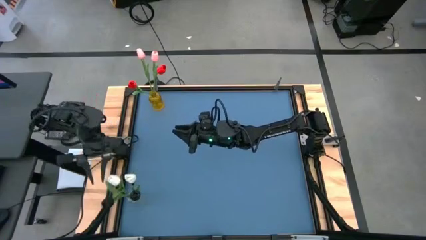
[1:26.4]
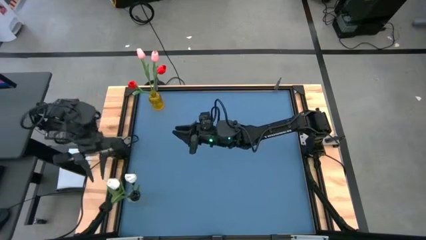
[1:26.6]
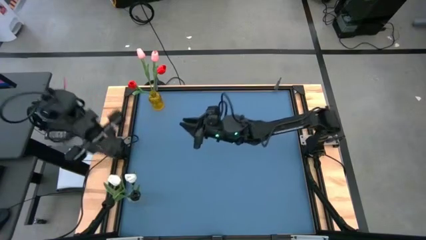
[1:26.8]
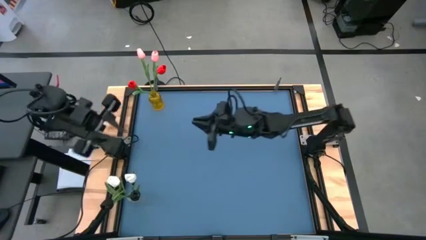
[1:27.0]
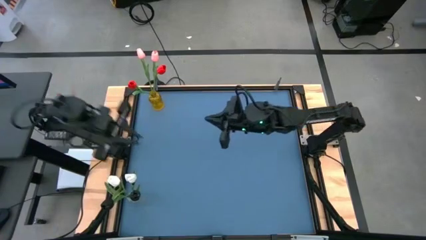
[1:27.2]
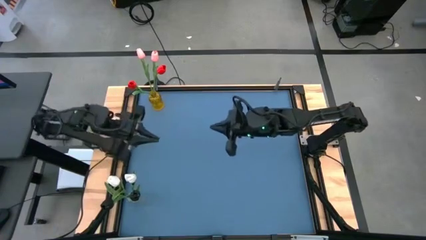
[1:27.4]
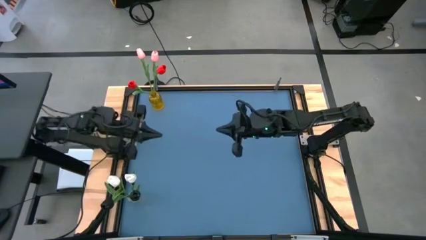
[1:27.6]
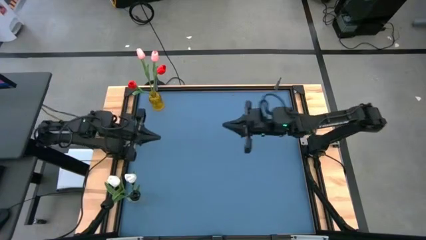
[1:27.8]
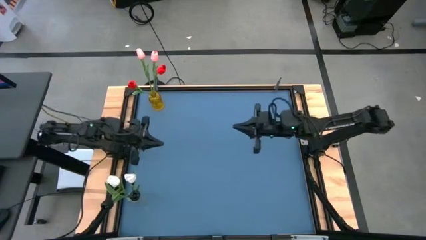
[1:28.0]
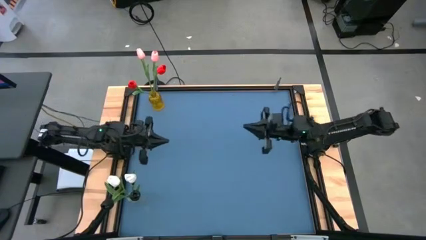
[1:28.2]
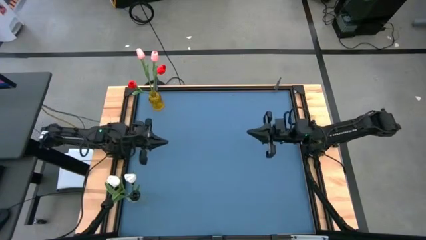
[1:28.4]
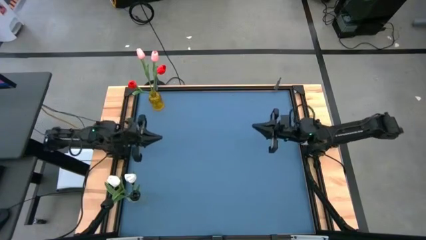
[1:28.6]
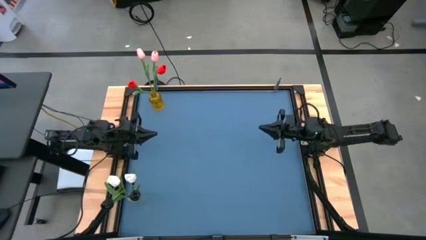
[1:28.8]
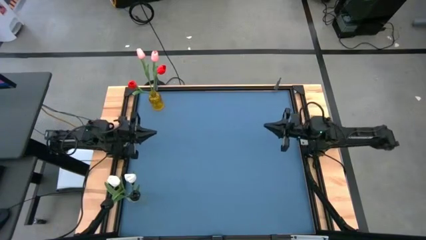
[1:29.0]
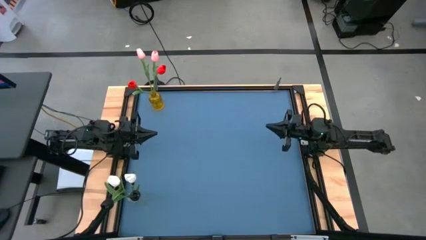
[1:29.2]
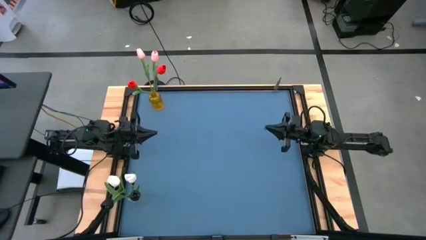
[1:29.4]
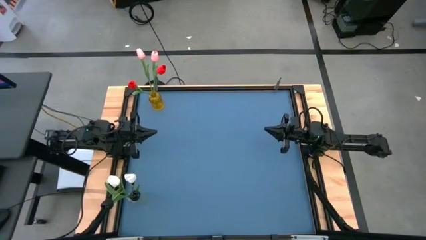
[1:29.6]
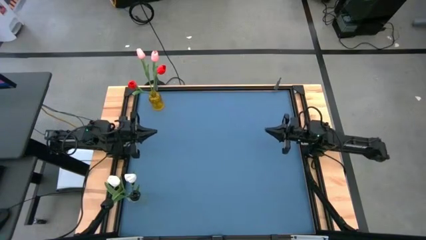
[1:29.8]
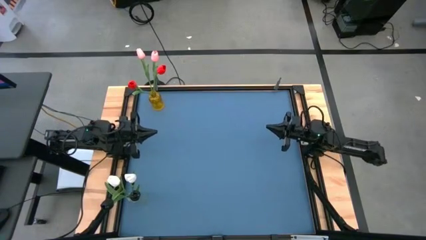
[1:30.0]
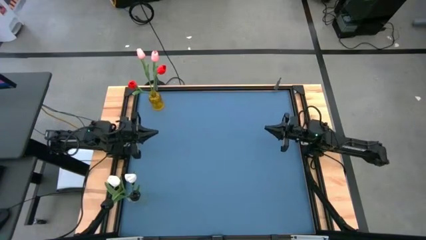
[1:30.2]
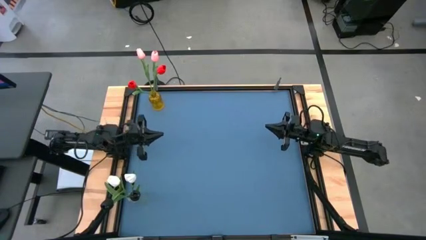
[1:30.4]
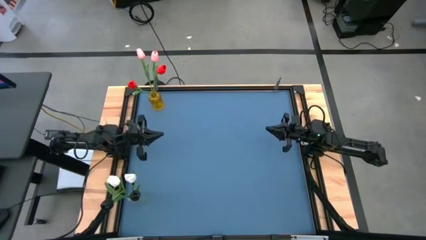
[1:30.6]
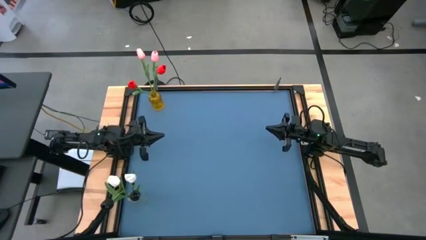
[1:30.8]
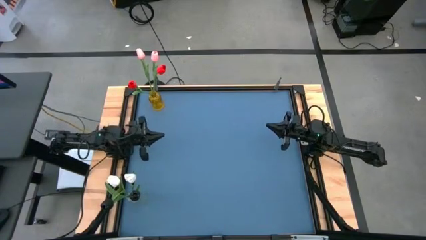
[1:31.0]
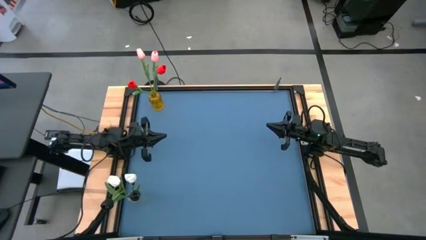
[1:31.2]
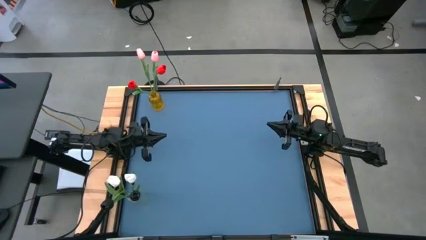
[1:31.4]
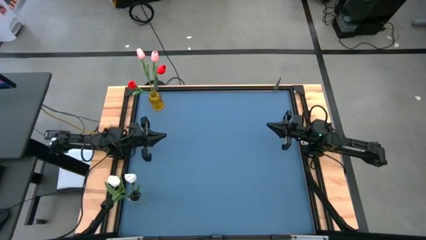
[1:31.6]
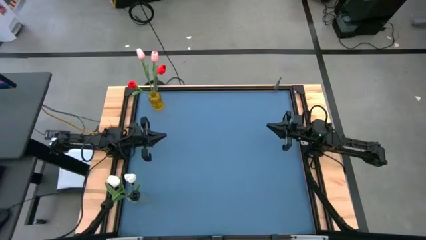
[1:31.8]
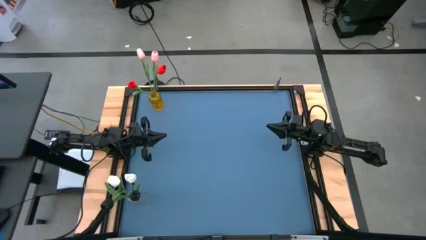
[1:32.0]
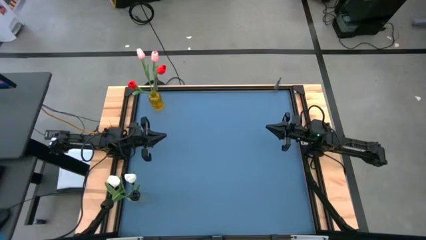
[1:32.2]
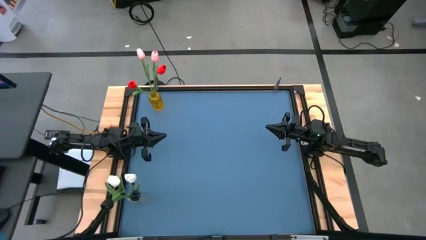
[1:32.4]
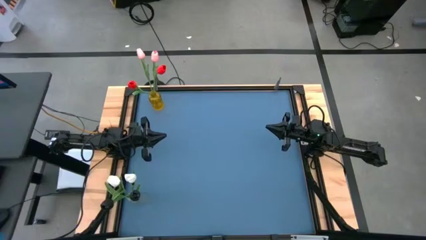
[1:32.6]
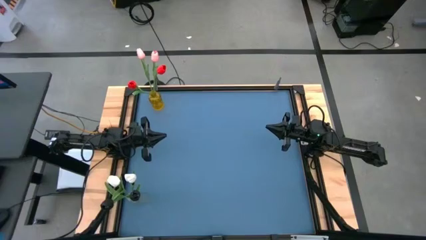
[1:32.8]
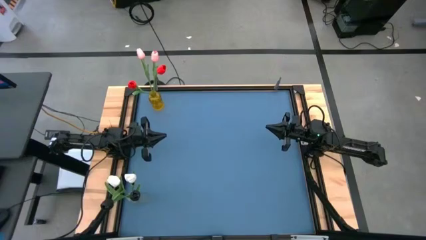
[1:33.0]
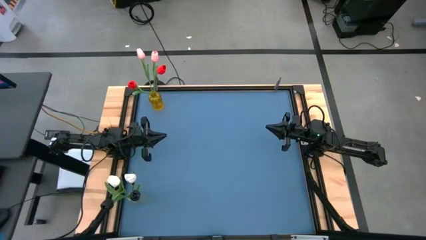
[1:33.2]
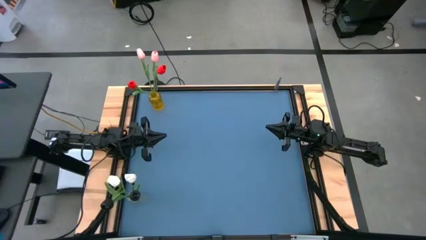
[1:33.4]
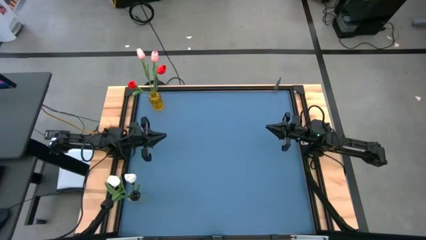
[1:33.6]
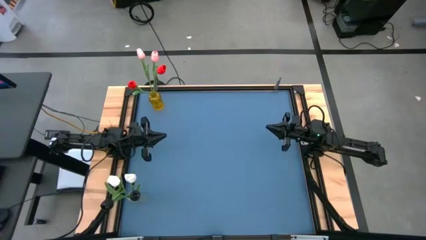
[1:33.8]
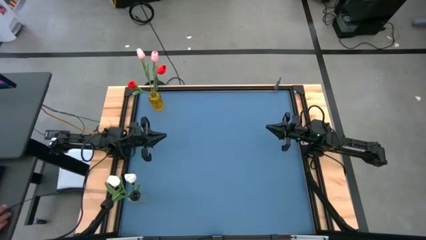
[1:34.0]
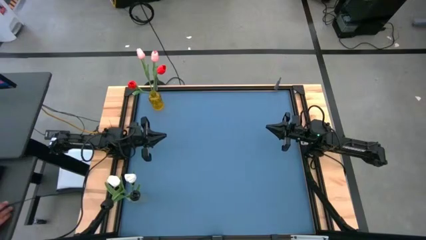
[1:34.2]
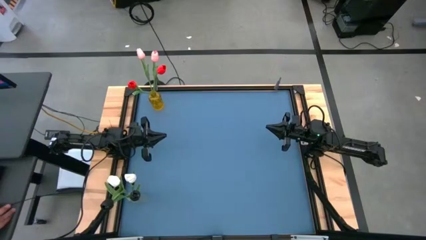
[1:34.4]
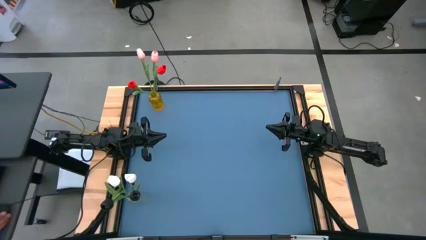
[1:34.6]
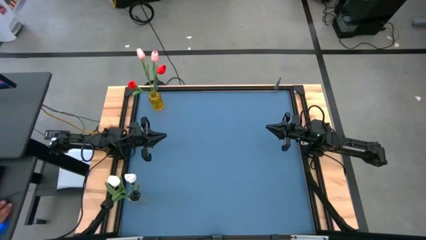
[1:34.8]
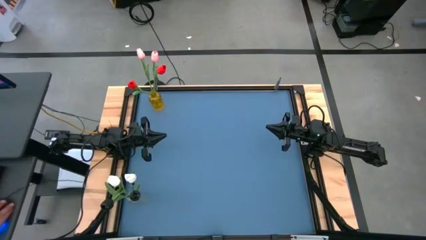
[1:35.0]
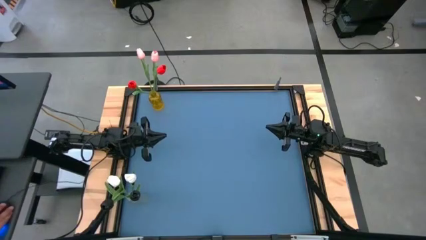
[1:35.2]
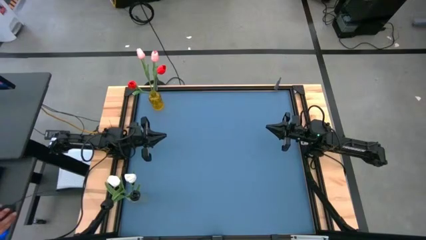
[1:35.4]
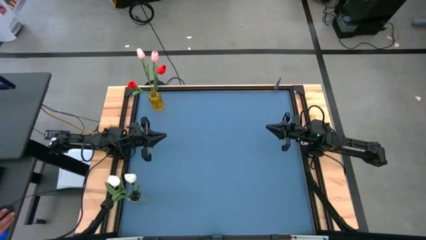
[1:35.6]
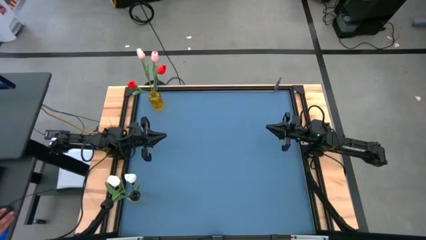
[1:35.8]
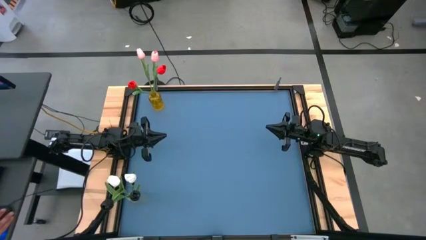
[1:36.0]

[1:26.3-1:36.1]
Task: Sort flowers into vase by color
Return to Home Position

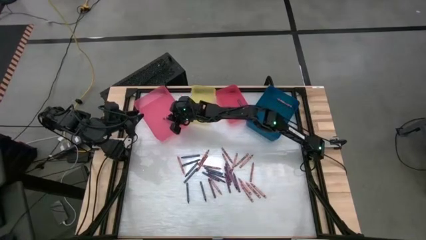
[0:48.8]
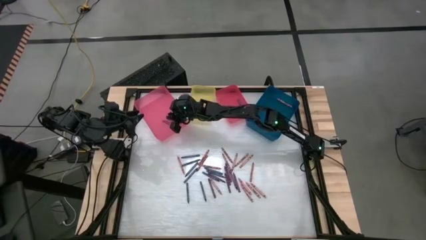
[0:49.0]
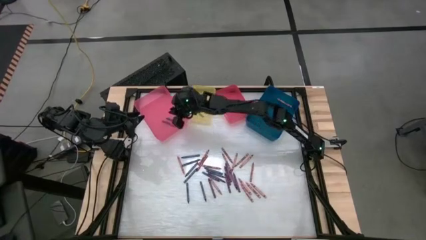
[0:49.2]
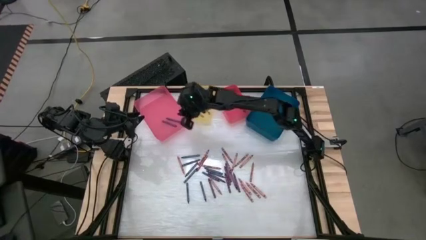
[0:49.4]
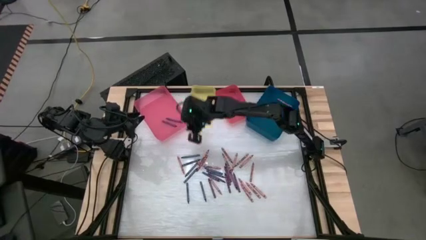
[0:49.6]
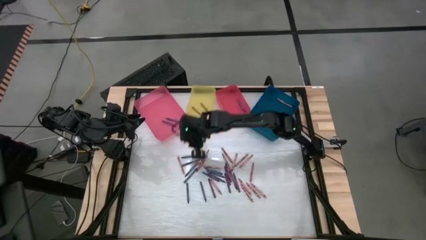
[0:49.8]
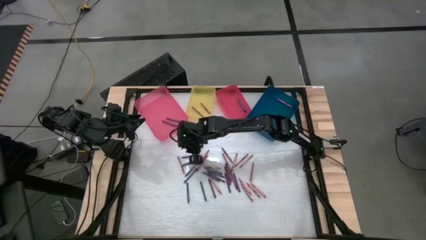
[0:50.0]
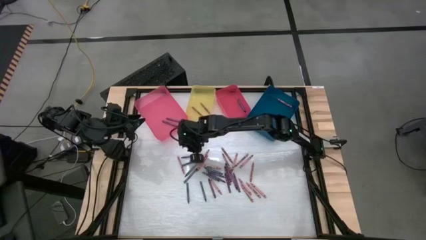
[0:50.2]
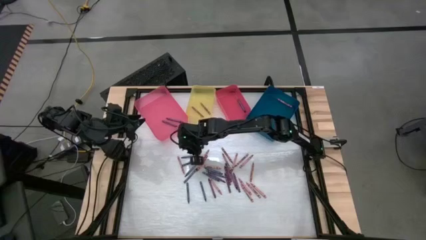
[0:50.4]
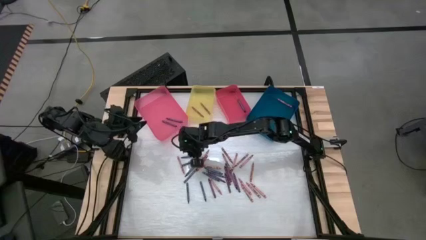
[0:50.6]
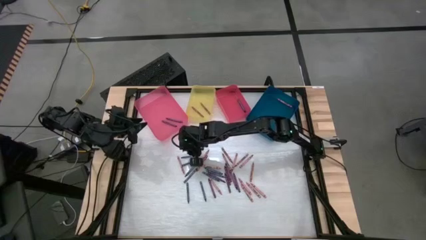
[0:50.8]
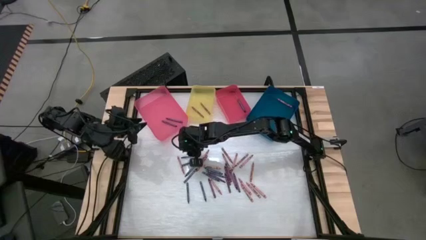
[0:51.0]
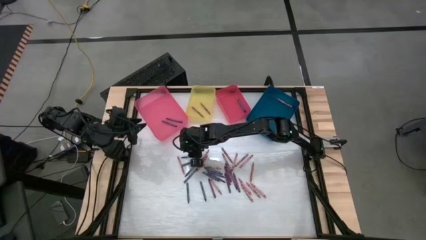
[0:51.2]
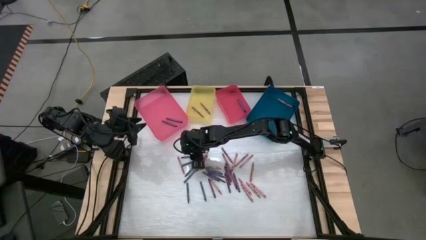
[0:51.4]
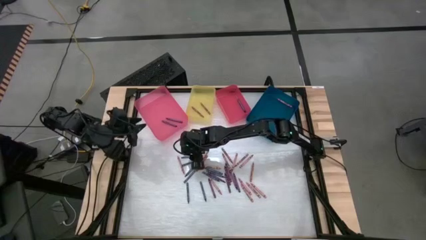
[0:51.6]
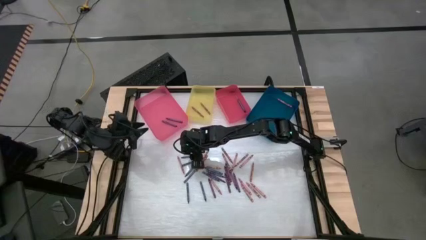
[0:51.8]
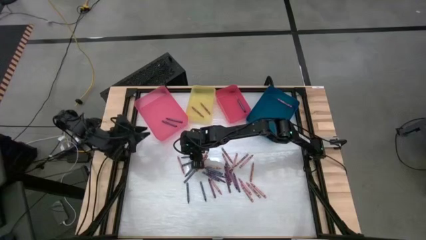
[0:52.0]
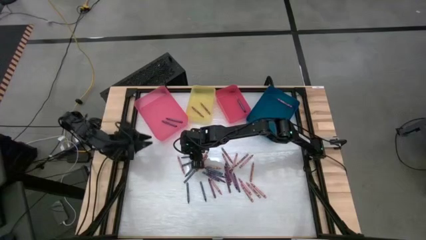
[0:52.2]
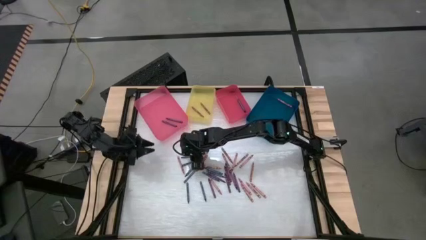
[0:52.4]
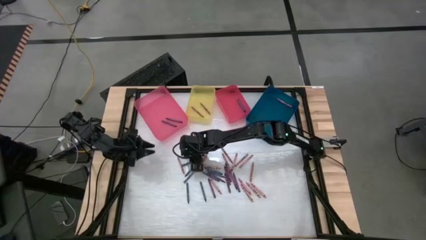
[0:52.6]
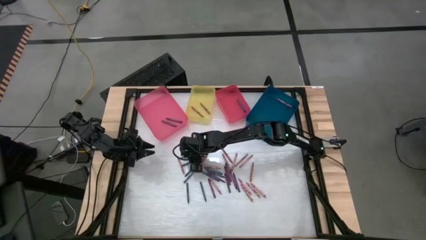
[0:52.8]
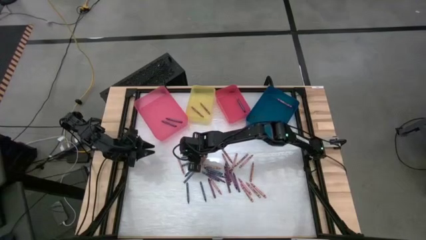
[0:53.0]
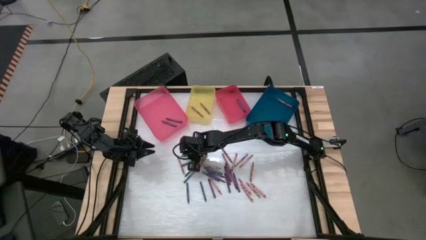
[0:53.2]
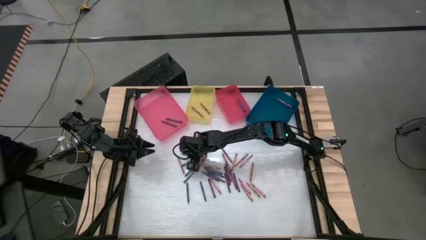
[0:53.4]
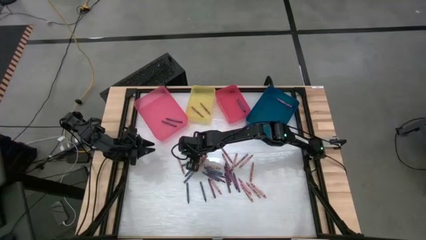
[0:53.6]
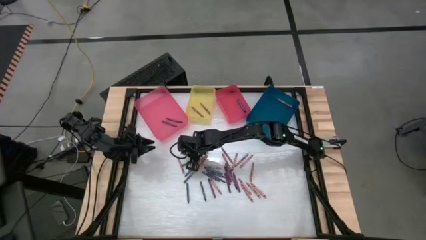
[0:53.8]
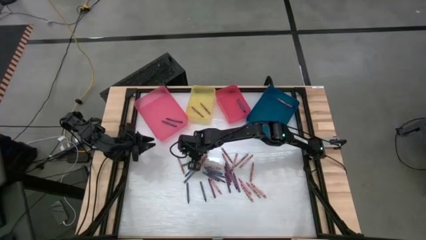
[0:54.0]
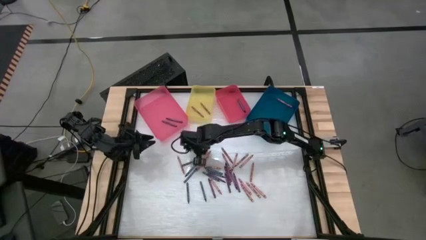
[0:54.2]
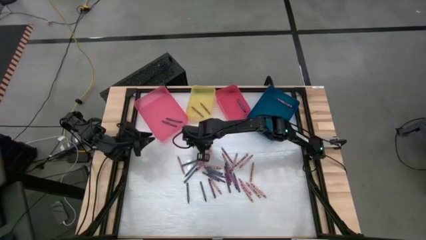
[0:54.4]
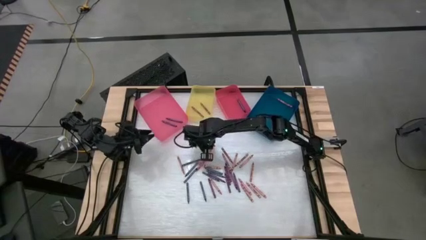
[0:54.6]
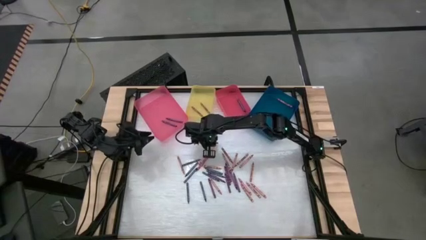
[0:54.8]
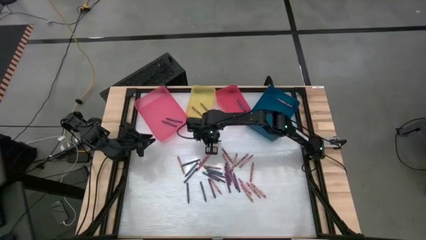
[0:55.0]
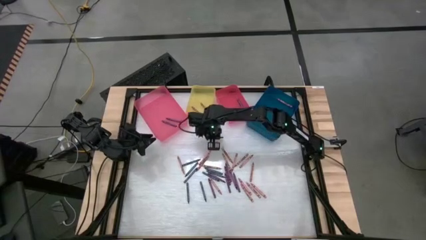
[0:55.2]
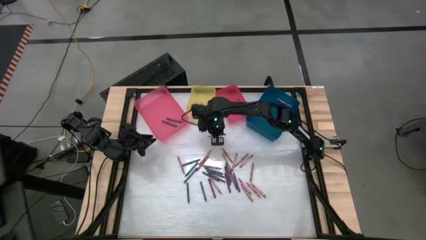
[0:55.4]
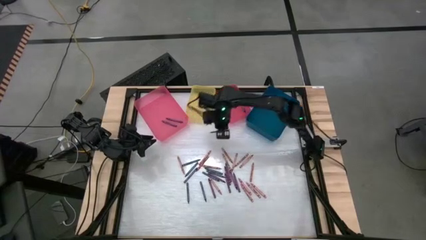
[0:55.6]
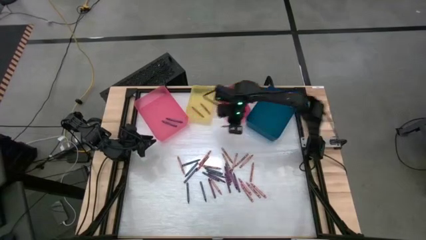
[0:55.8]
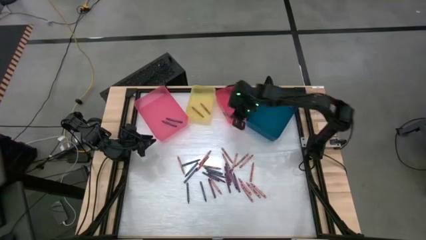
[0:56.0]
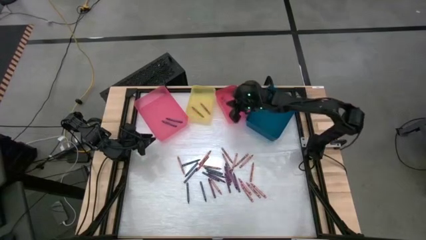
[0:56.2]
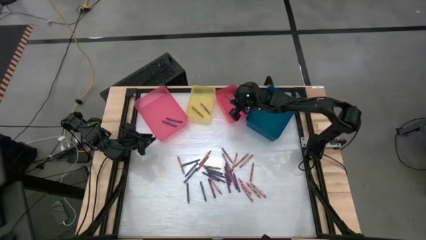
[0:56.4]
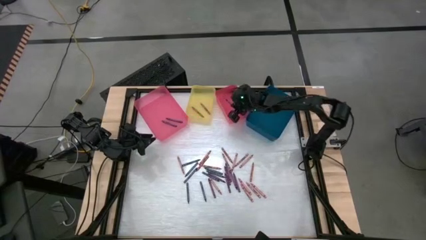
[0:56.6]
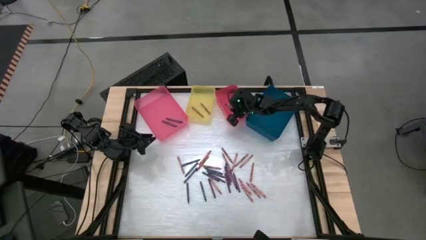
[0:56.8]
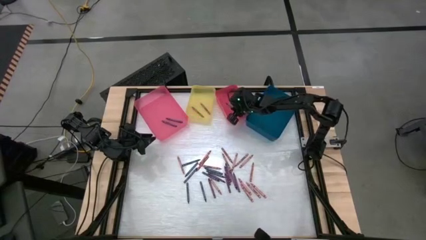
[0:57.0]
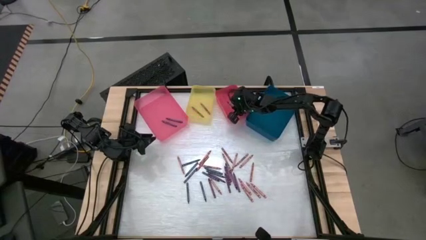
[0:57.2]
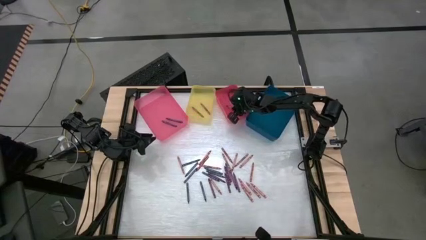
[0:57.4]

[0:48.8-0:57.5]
Task: Sort crayons
Put the blue crayon into the red bin
